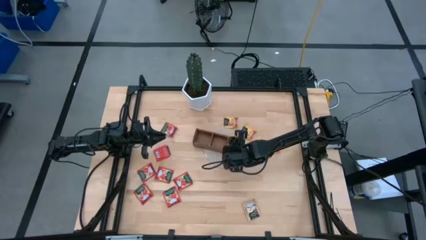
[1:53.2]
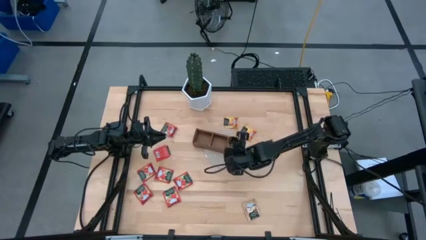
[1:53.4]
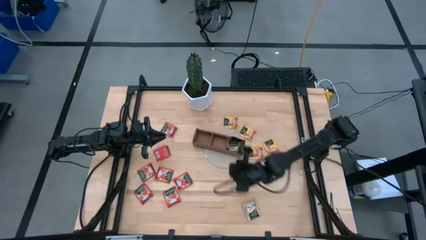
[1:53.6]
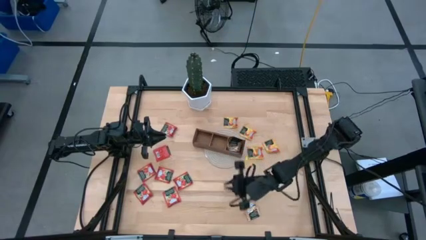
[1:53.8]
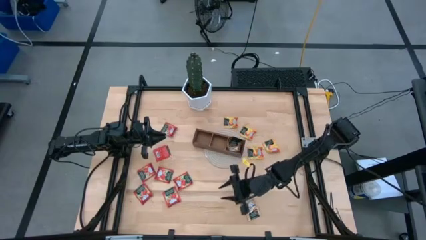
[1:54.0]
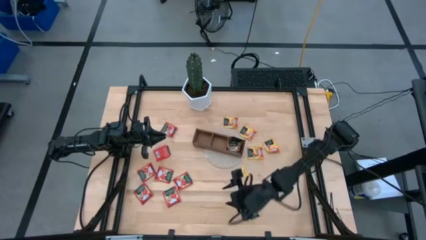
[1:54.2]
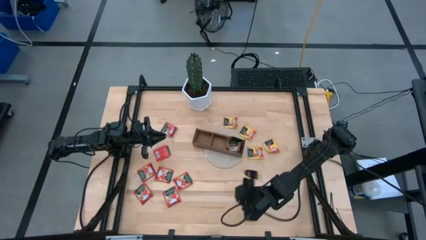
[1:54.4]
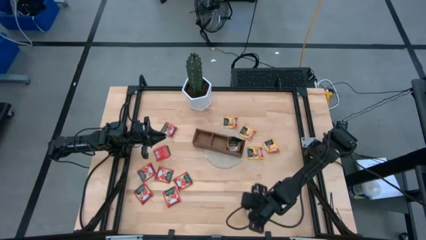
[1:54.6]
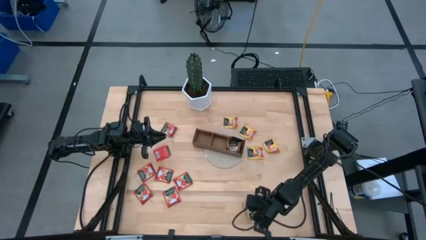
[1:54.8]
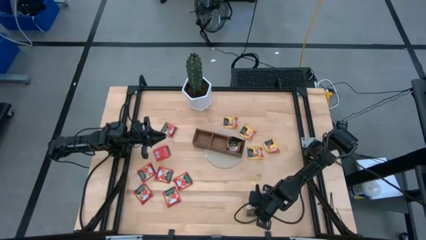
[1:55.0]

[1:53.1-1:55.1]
Task: Pick & Place Tea
Put the brown tea bag into the right section of the wooden organizer

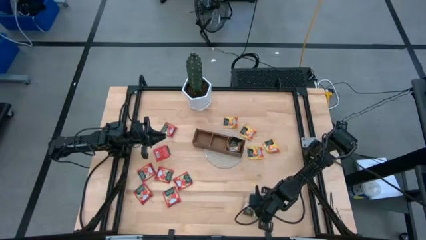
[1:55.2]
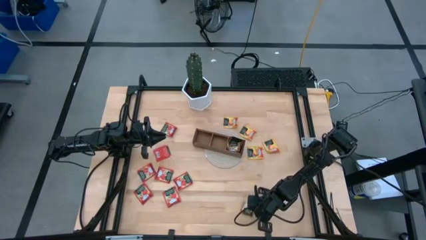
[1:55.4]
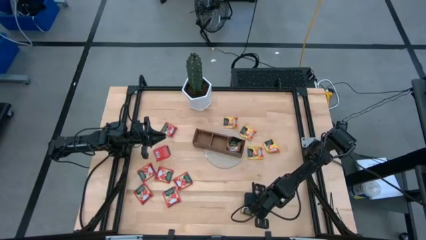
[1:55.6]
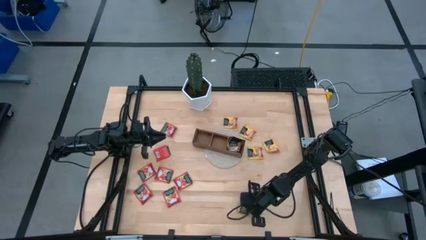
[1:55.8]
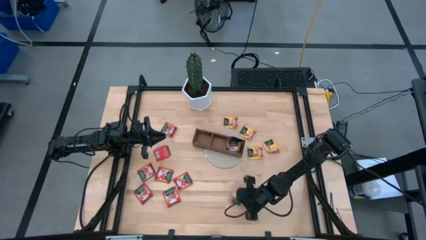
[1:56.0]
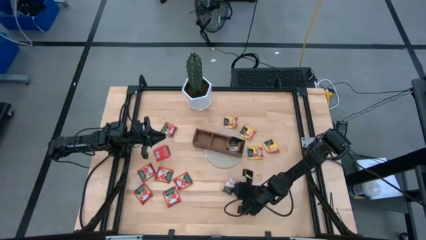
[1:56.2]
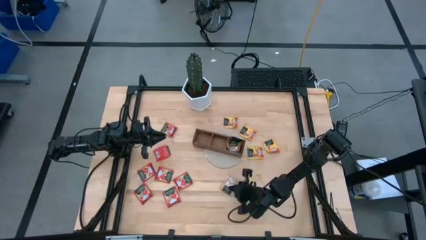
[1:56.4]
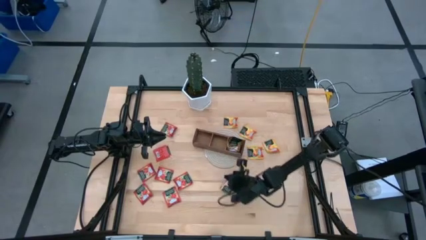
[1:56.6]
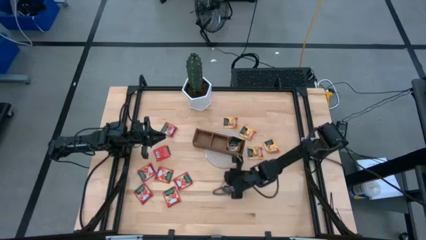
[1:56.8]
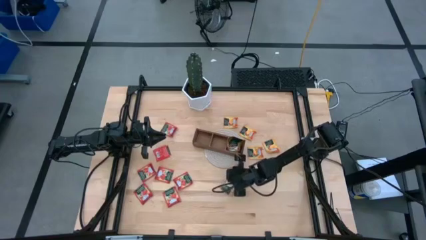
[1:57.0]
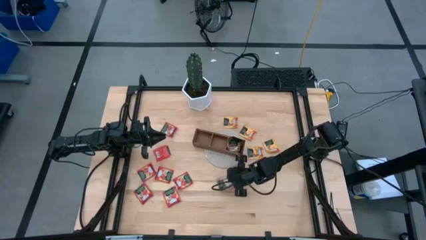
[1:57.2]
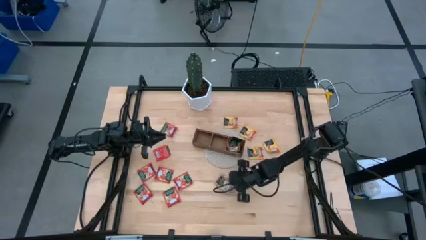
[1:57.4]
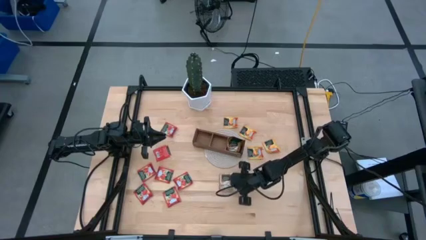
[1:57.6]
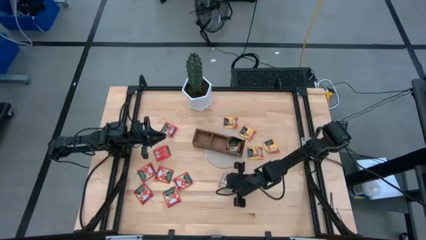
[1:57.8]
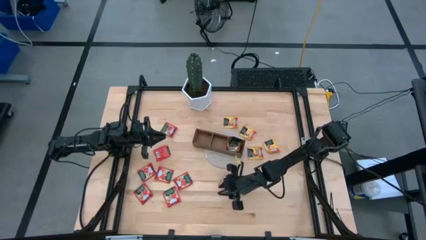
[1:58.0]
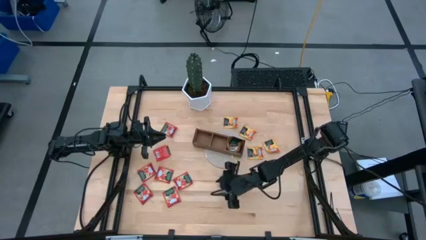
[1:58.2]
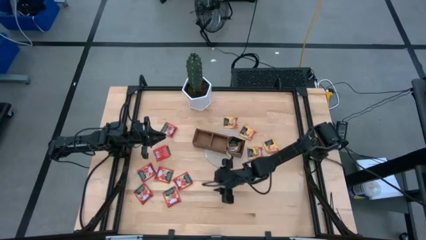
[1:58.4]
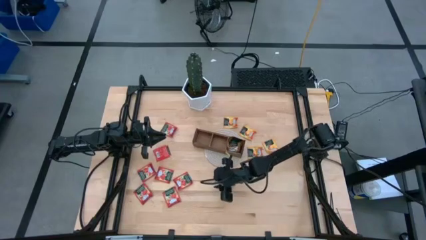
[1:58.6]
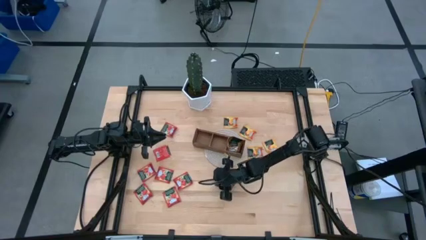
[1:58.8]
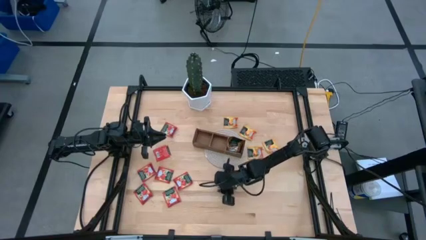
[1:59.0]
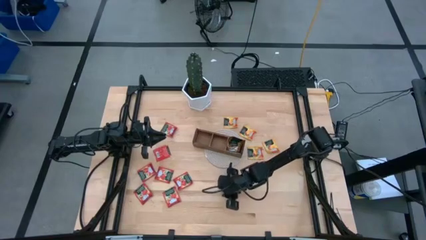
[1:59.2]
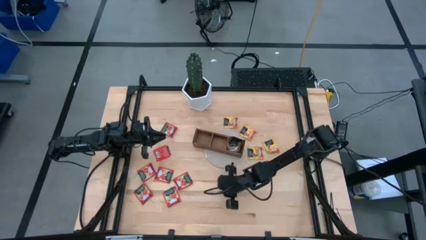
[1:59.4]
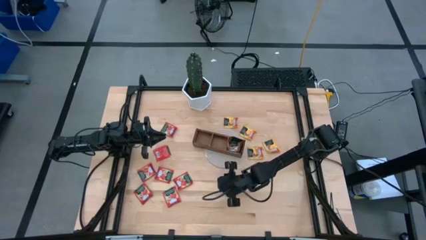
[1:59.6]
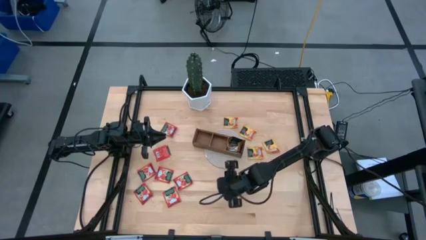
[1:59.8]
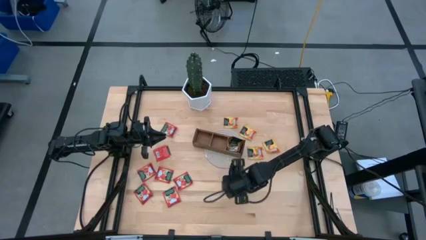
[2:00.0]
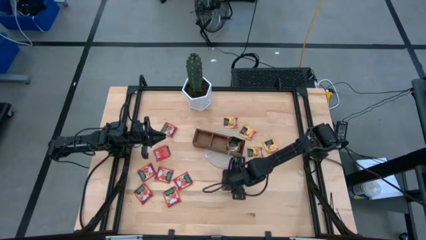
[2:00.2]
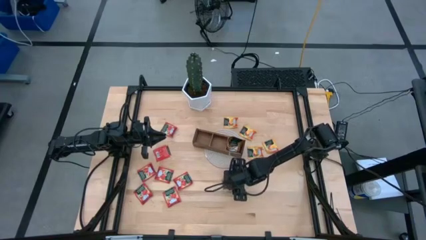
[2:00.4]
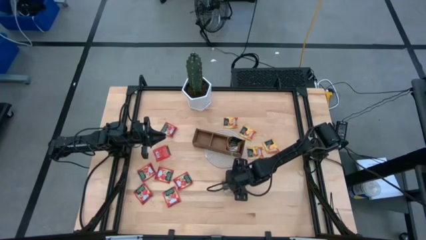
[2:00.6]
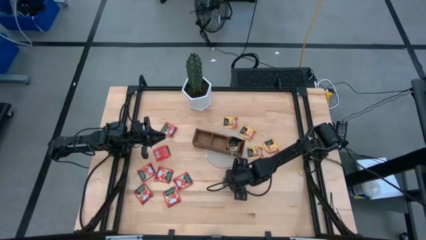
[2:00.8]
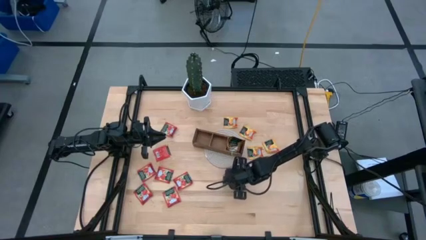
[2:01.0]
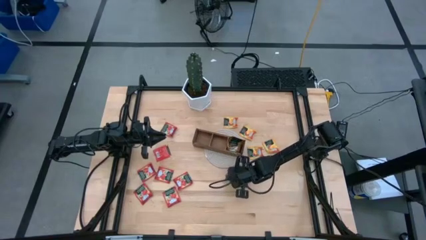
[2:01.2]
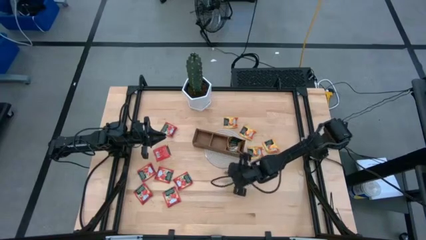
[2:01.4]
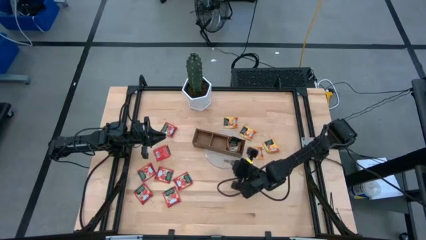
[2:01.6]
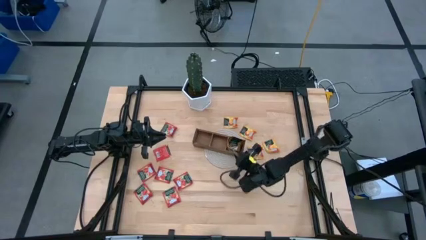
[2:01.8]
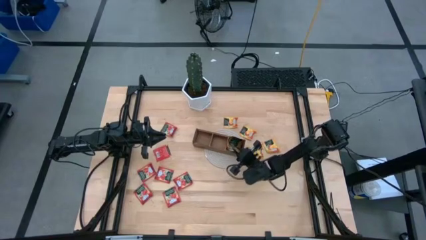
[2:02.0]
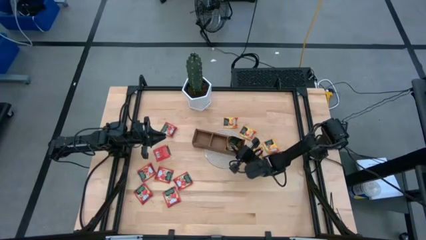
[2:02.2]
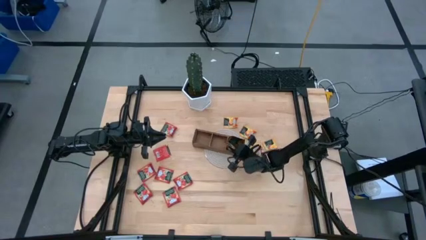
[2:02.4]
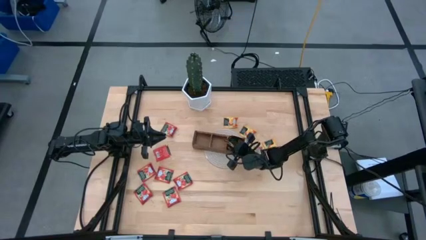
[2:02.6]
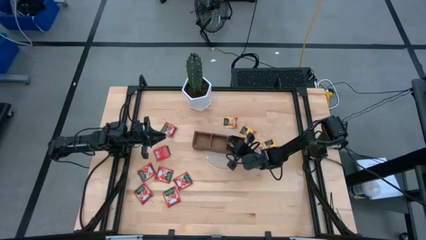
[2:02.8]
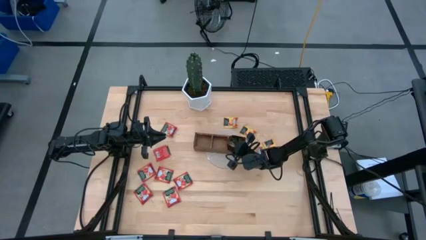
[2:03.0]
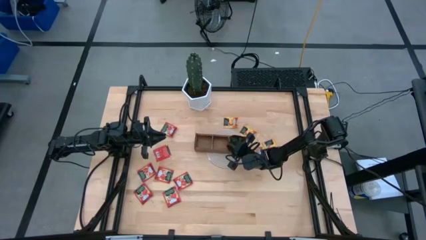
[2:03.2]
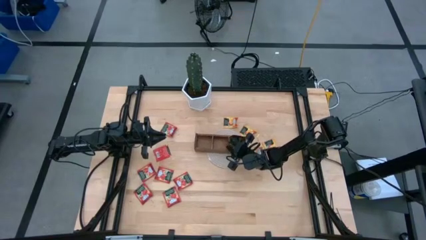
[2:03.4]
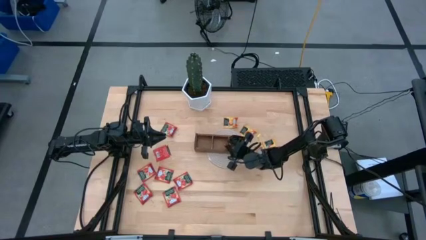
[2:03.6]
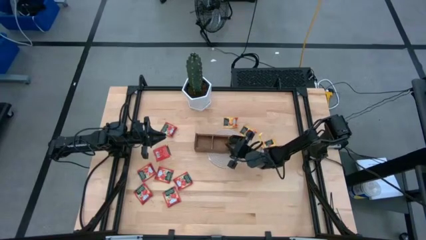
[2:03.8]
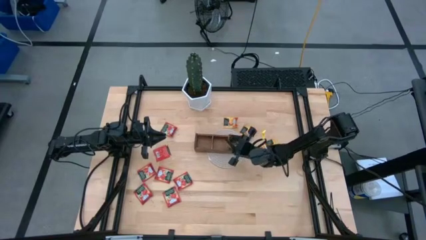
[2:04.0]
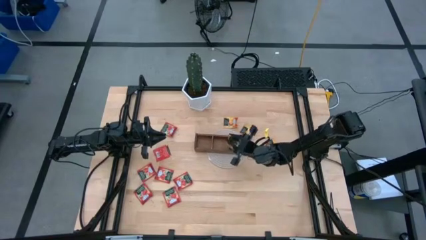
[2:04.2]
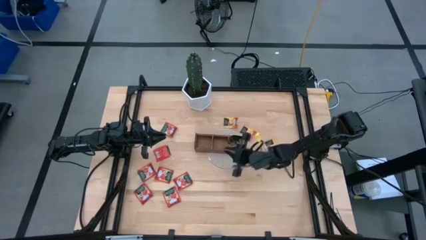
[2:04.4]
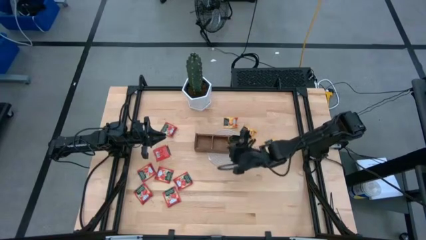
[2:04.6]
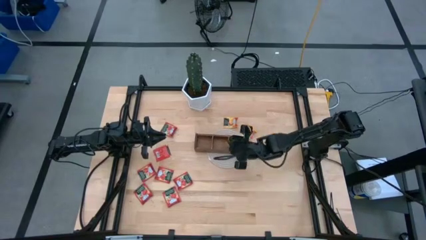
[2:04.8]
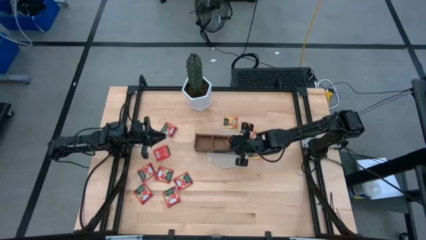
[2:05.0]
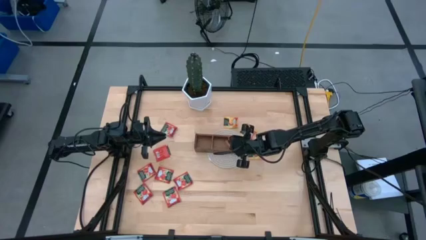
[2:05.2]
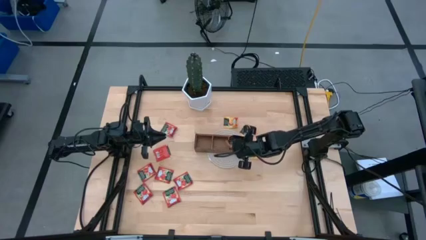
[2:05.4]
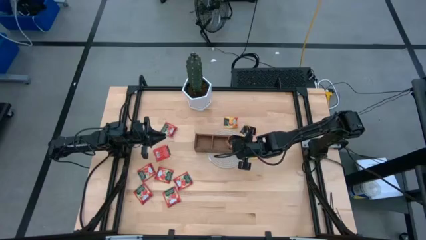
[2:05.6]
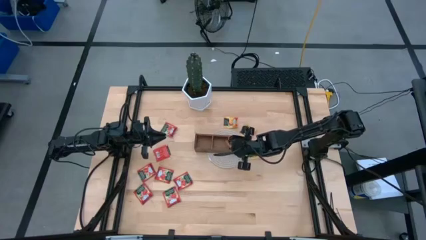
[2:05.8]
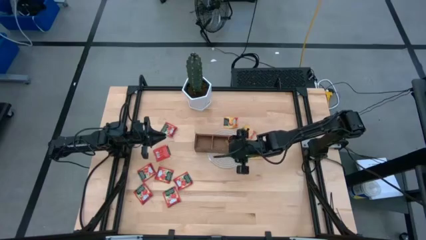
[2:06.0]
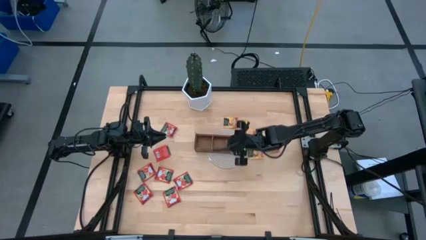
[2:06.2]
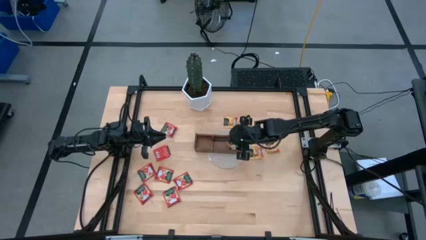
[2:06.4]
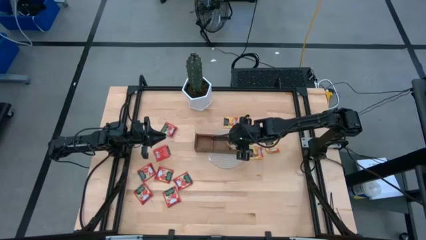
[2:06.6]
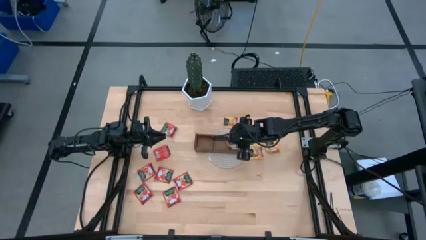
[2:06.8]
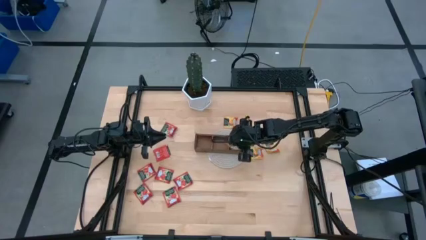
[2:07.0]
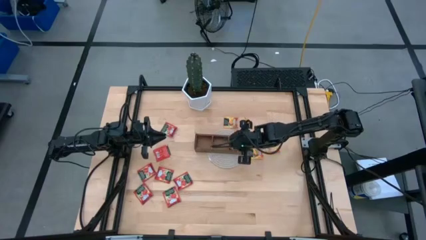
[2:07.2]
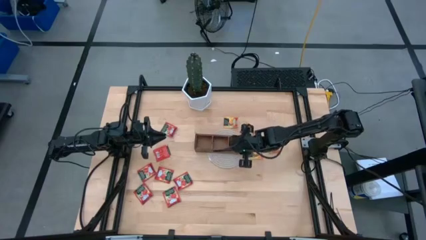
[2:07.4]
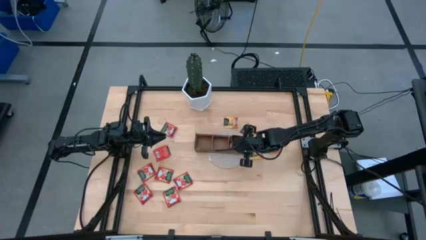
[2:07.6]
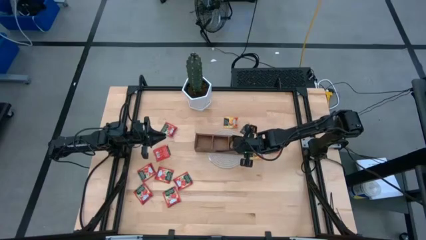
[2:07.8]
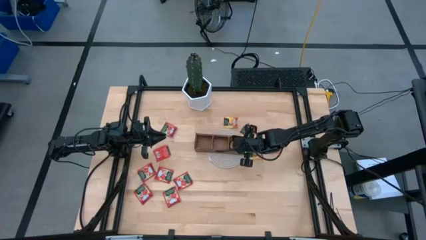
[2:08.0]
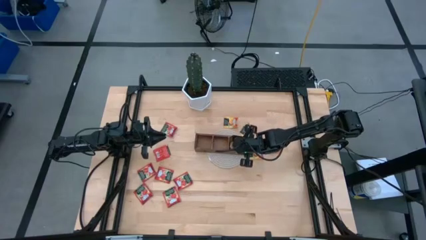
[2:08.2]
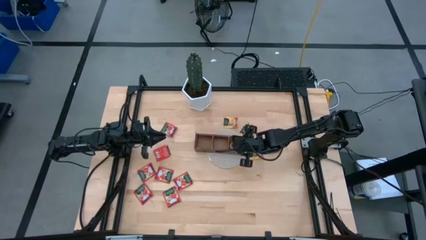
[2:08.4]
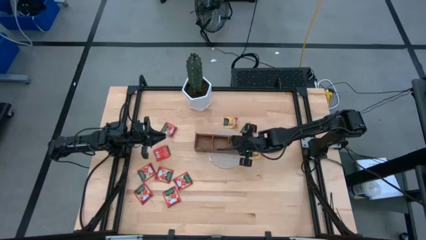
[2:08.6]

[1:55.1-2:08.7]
Put the brown tea bag into the right section of the wooden organizer

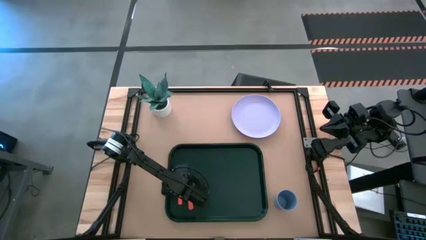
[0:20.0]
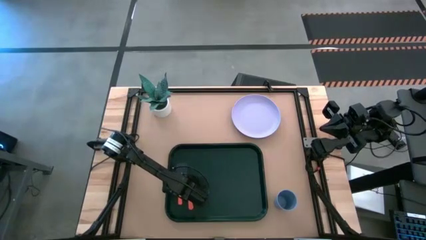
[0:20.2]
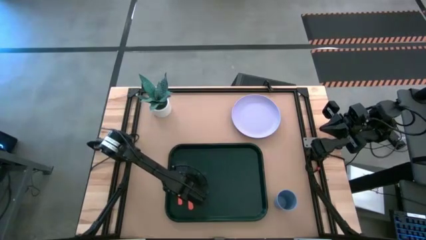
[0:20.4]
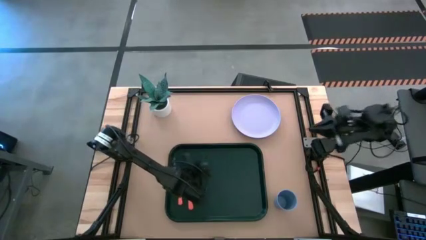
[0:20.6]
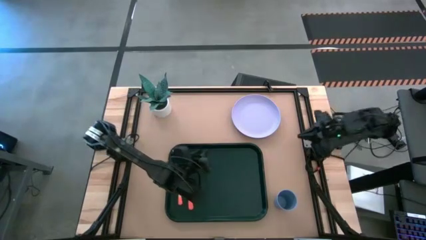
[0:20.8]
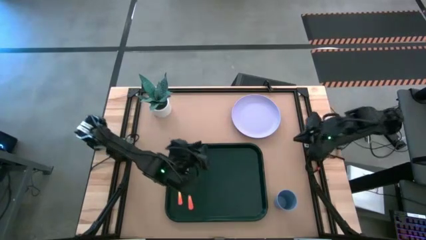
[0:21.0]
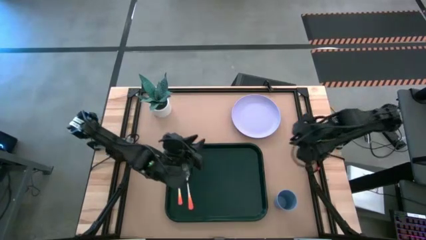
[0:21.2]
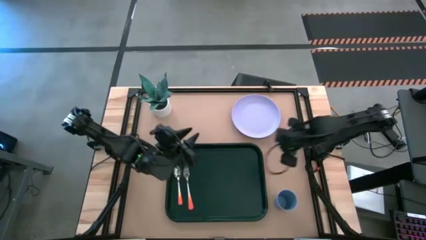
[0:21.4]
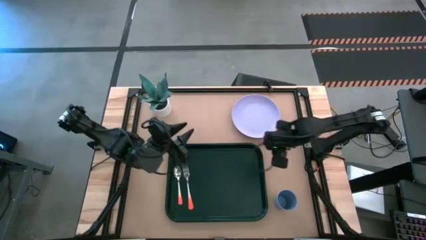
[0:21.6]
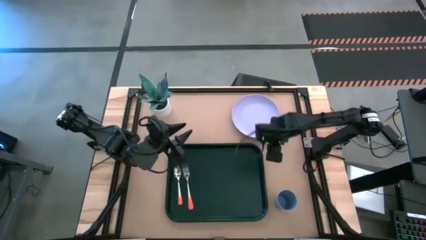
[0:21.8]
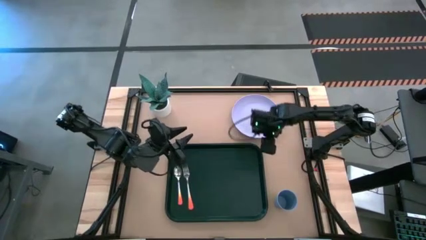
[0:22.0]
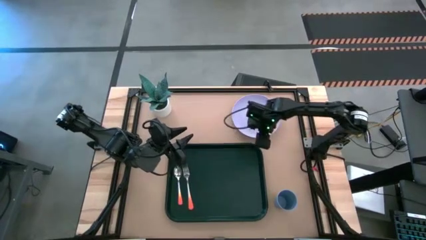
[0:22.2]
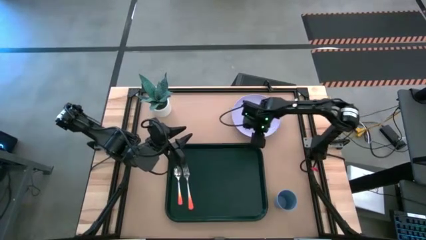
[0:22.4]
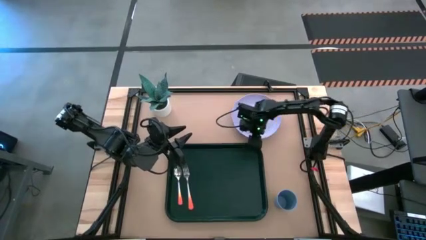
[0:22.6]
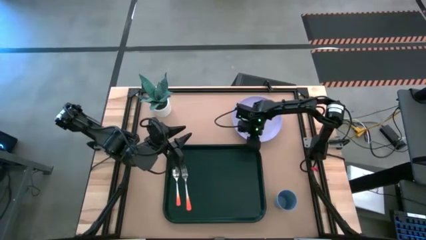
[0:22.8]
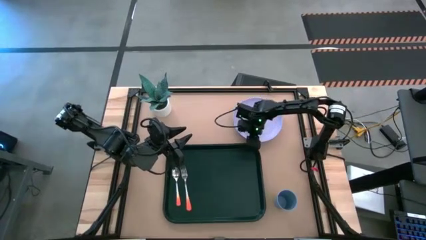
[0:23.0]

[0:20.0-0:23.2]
Task: Pick and place plate/cup/fork/spoon on tray
Put the white plate in the bottom center of the dark green tray
